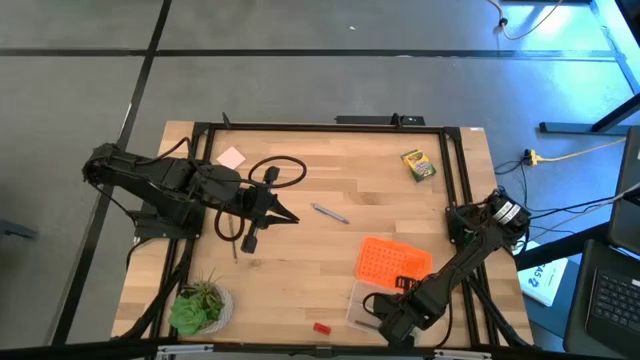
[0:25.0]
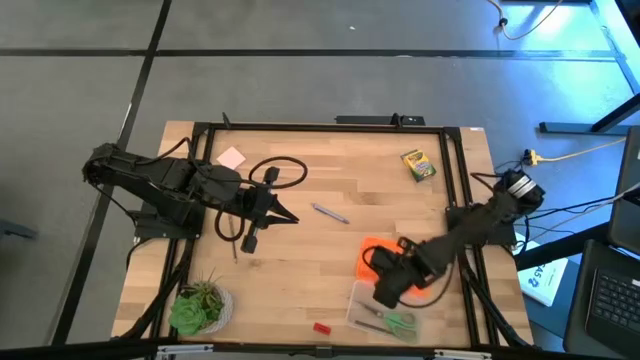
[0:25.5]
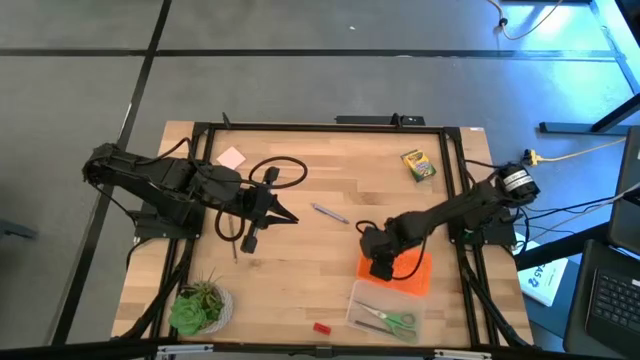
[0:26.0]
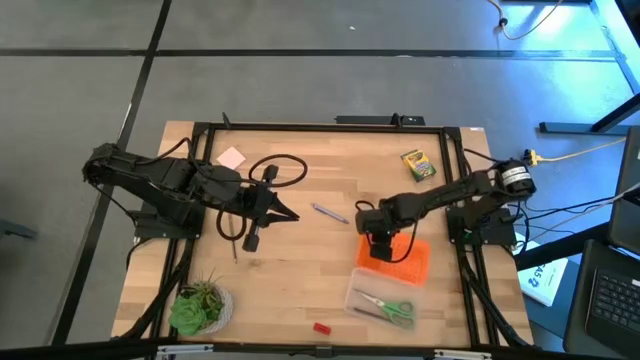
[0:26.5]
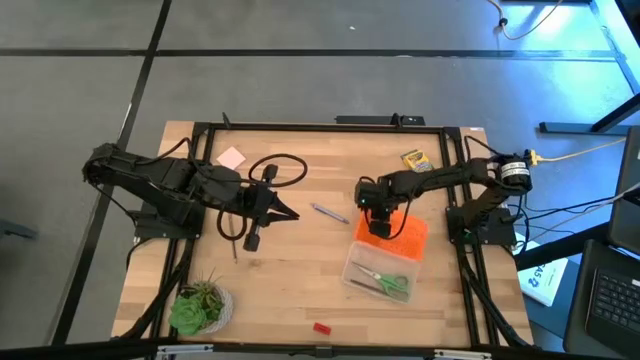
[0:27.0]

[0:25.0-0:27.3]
Task: Pack school essentials
Adjust the orange supply box

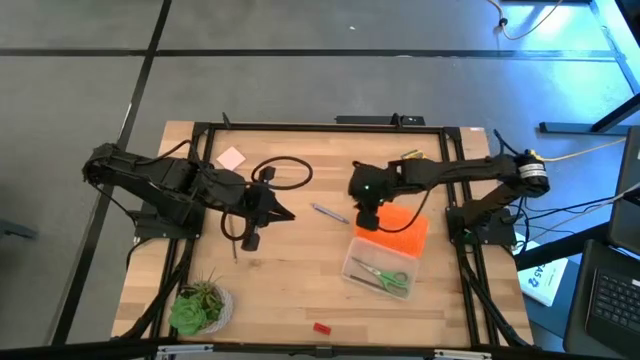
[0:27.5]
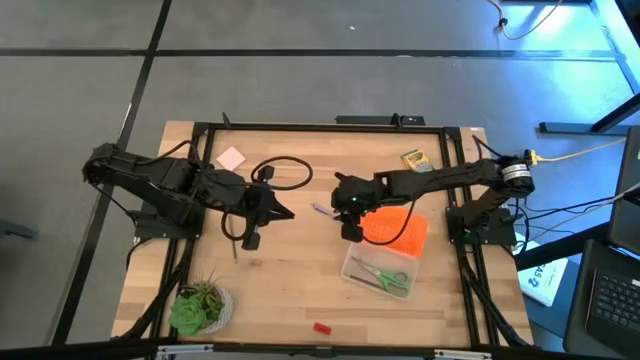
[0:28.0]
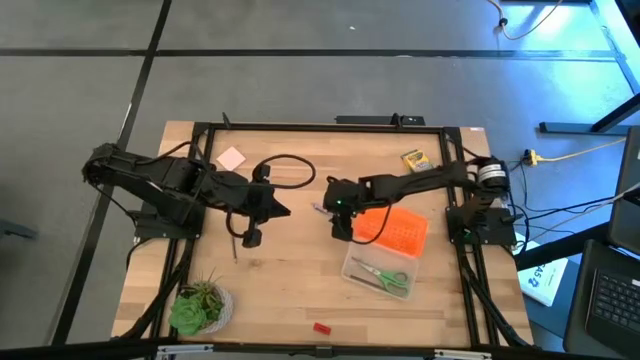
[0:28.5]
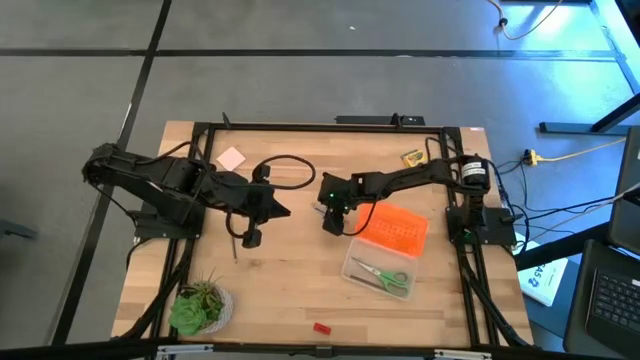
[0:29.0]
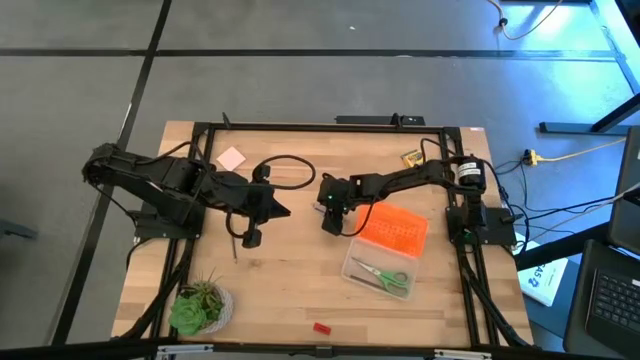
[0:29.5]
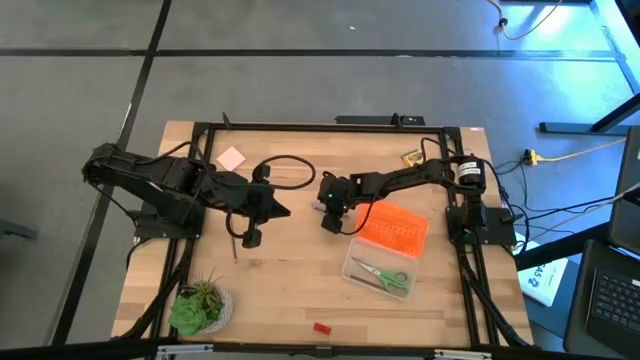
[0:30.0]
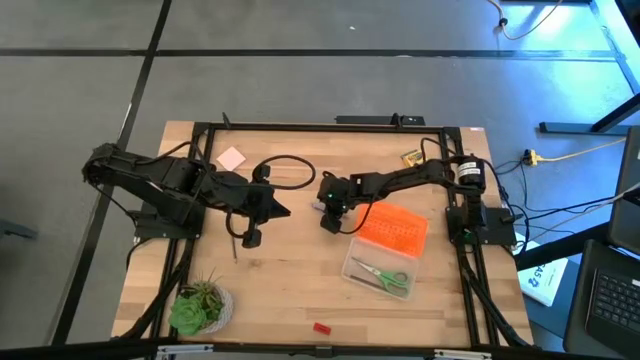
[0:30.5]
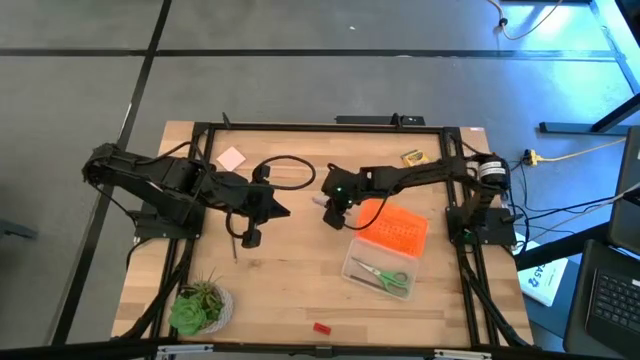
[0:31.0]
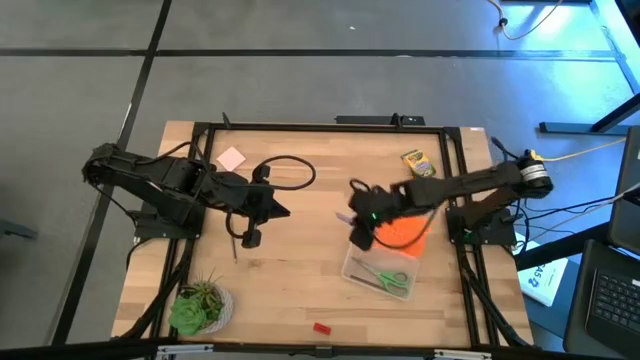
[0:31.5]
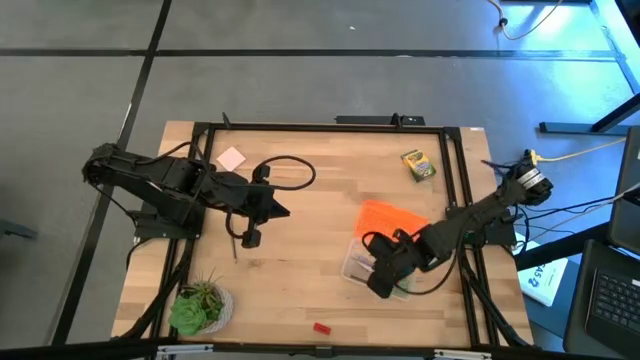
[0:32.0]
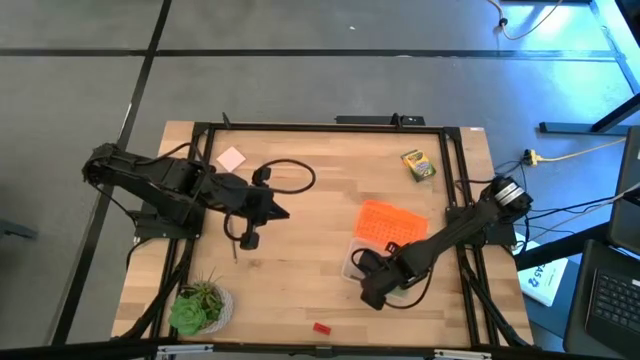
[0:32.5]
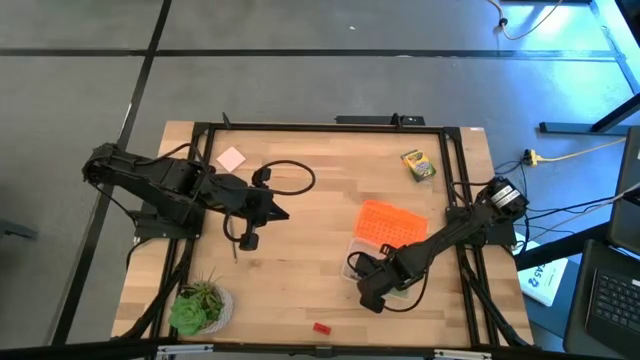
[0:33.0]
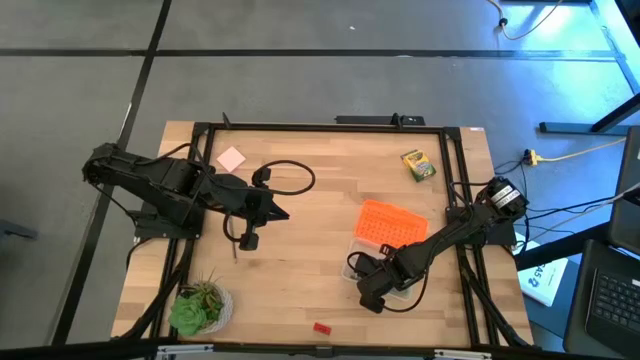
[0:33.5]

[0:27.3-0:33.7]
Put the gray pen into the orange supply box

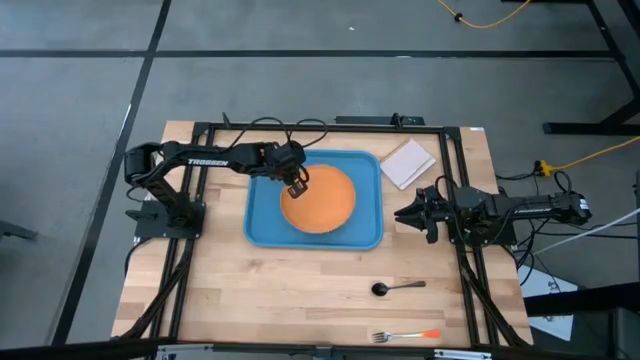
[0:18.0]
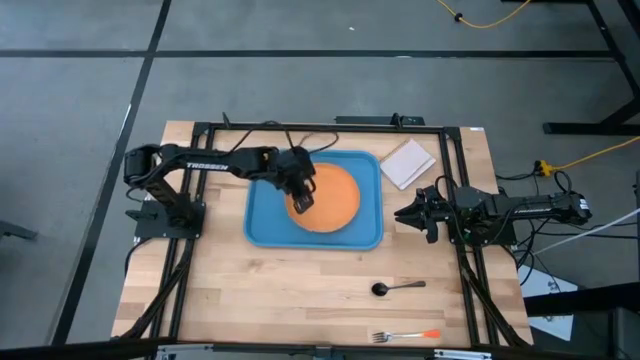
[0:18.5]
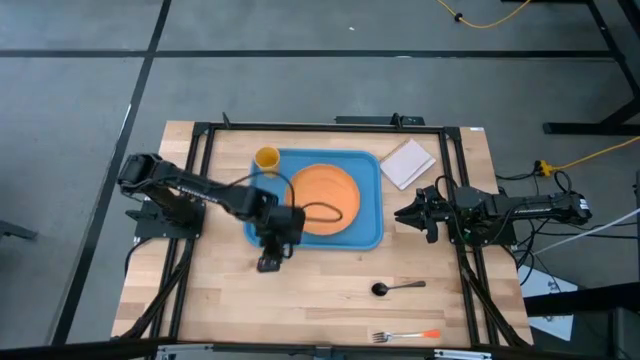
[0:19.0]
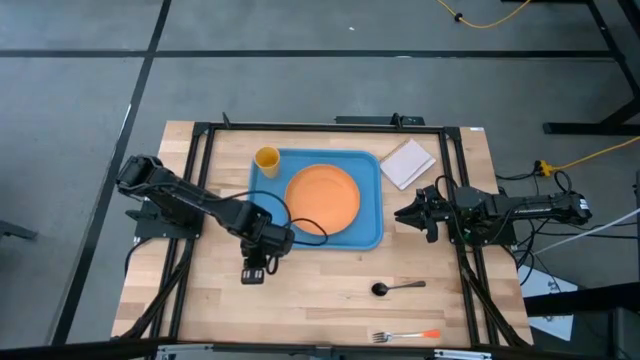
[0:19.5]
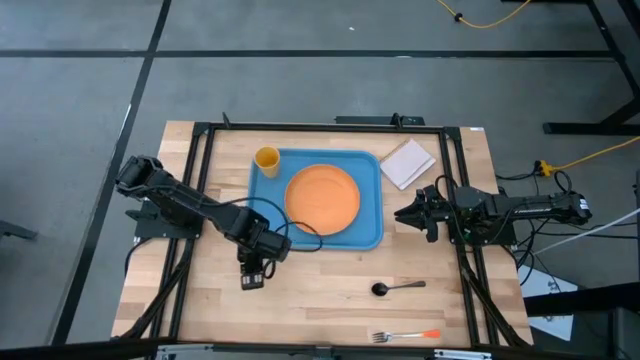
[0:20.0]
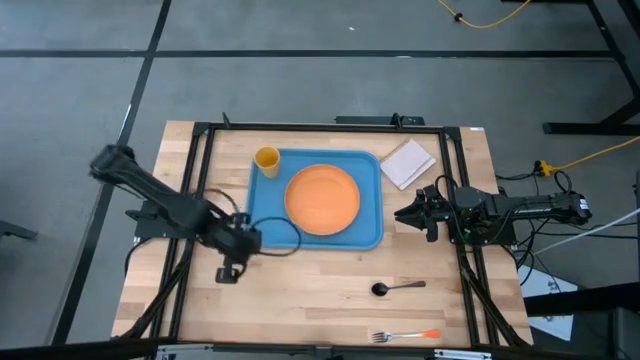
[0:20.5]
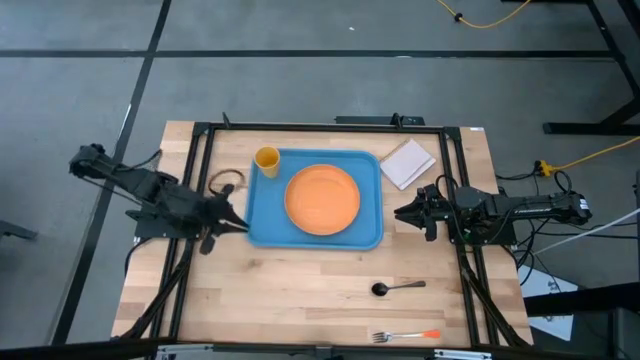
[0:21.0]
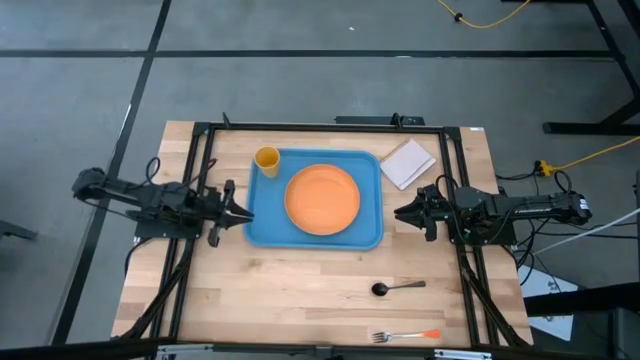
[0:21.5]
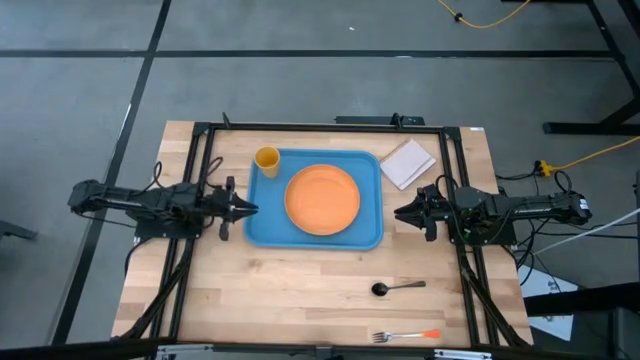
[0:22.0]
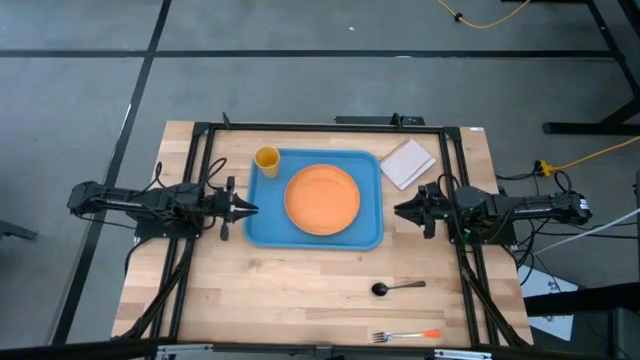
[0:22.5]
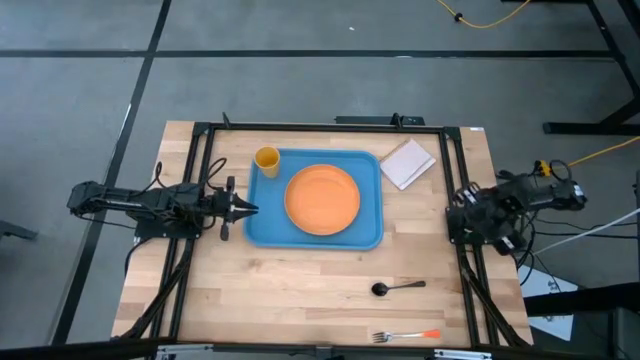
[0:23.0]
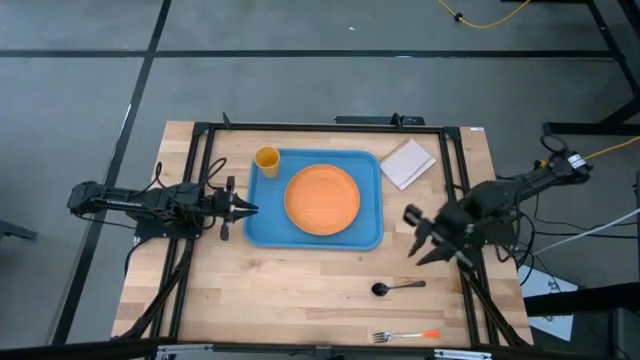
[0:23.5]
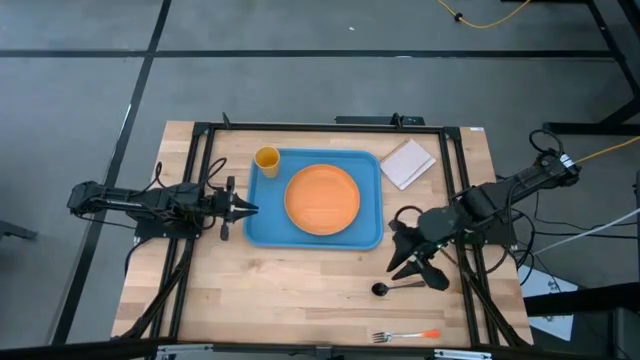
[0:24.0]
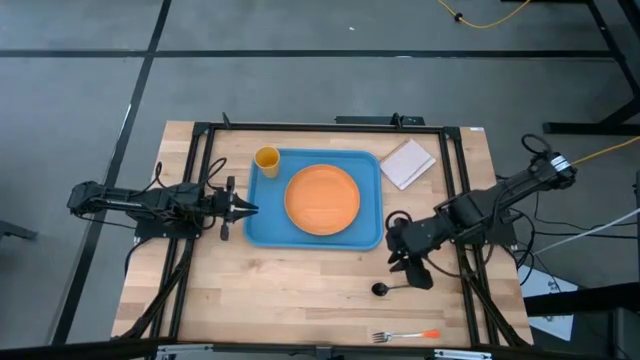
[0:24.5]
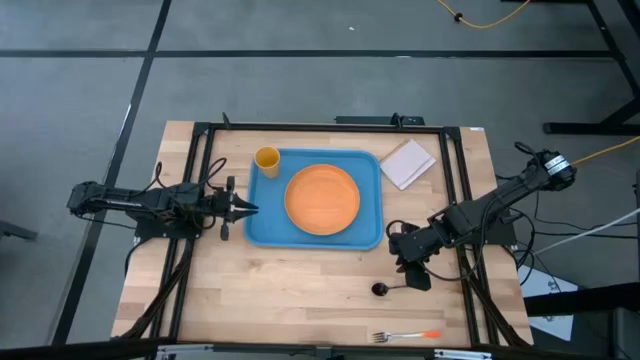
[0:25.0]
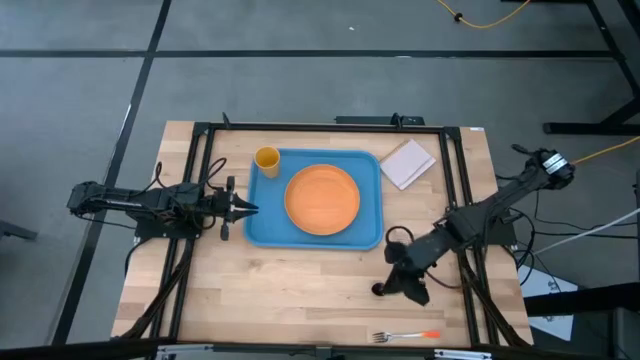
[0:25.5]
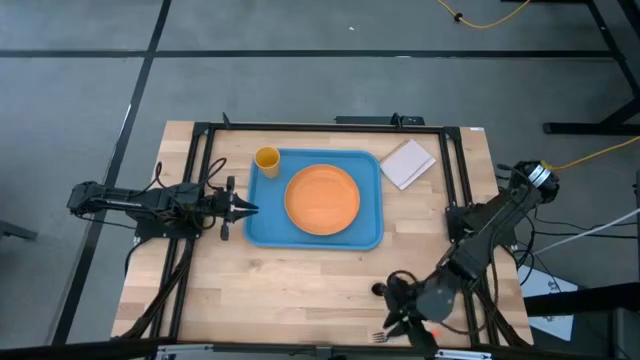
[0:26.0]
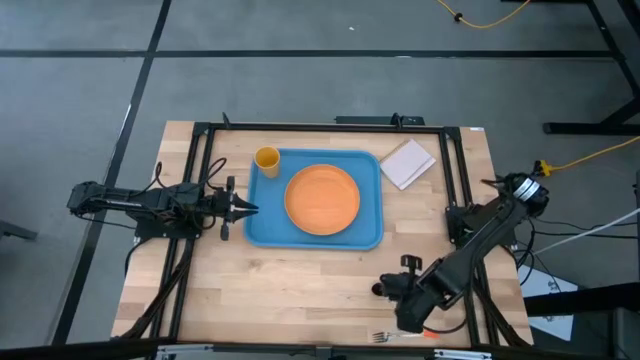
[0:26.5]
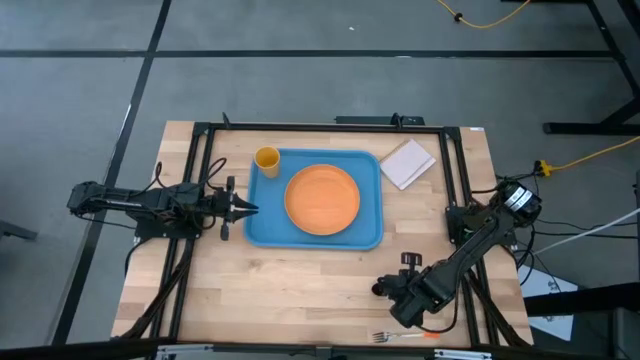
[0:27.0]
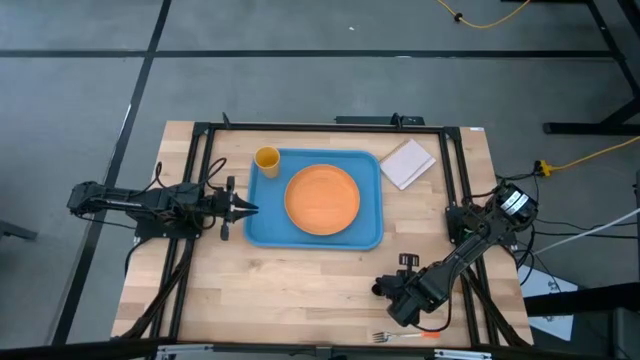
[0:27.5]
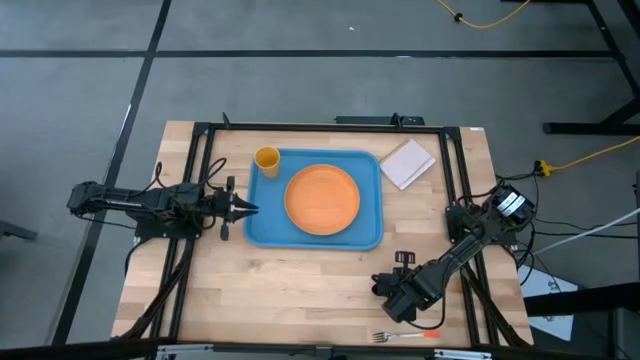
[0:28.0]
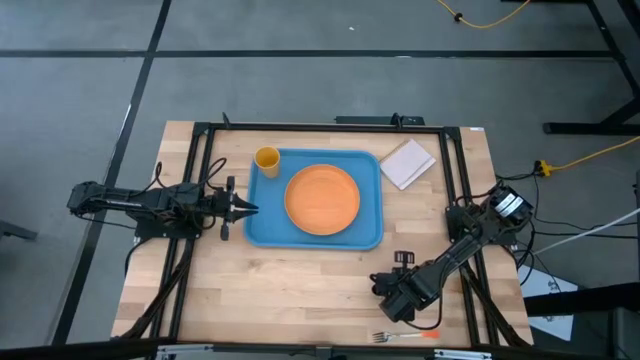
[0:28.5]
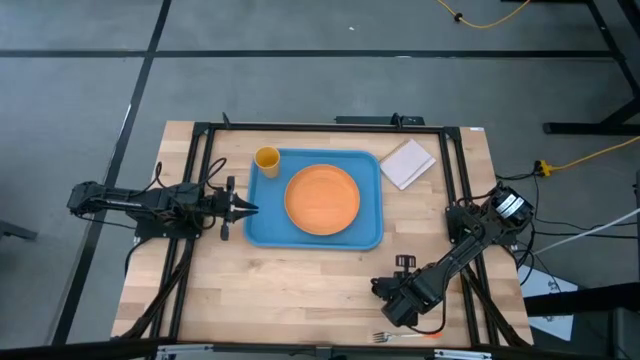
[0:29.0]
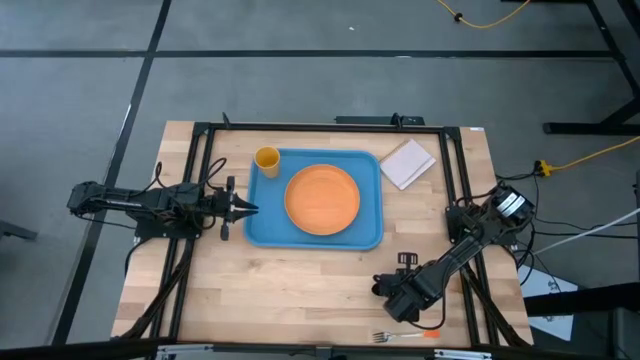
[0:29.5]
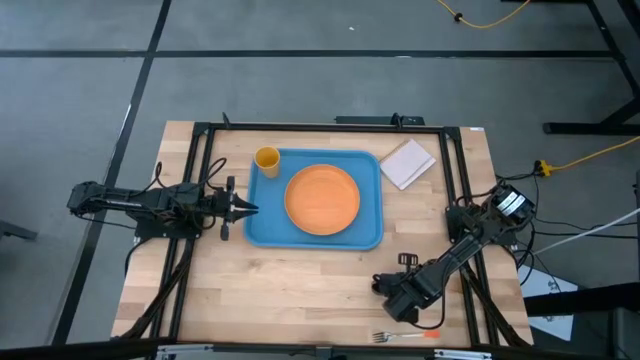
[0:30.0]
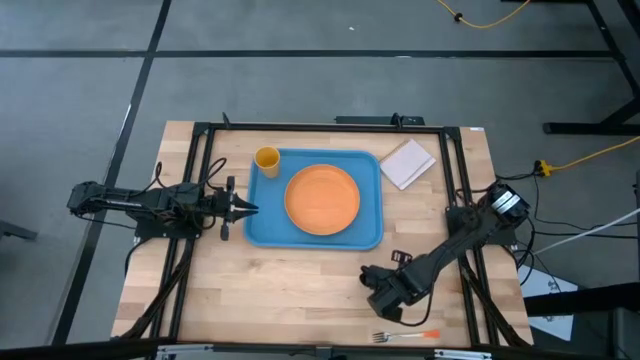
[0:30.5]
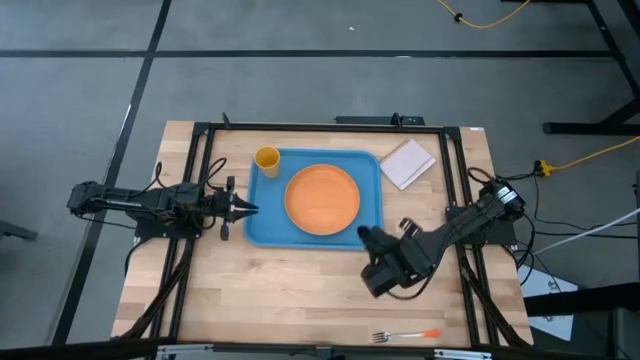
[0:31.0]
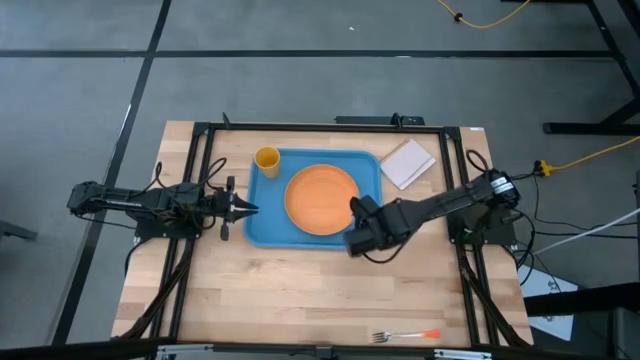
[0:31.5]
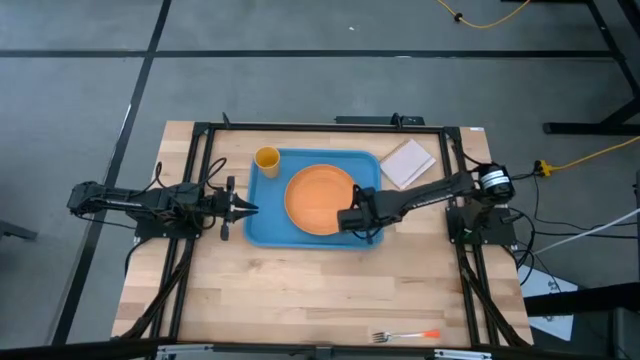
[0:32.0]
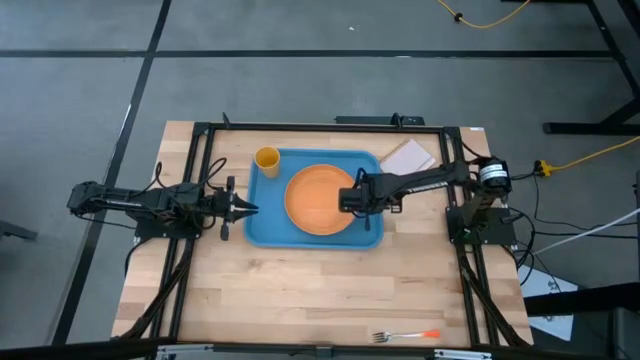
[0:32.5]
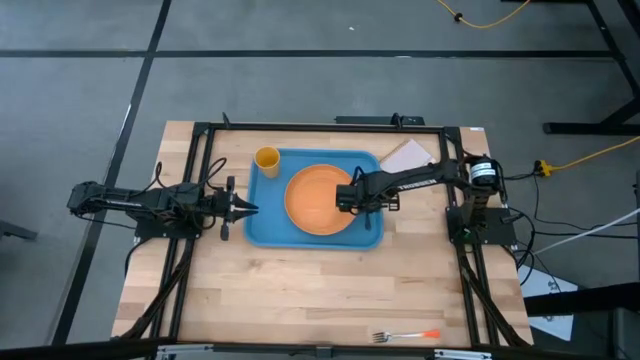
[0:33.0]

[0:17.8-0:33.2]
Task: Pick and place plate/cup/fork/spoon on tray
Put the black spoon to the right of the orange plate on the blue tray
